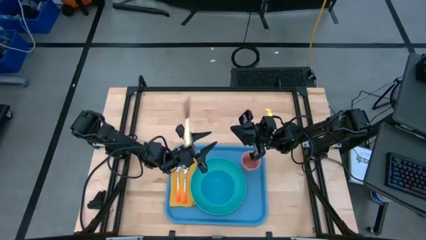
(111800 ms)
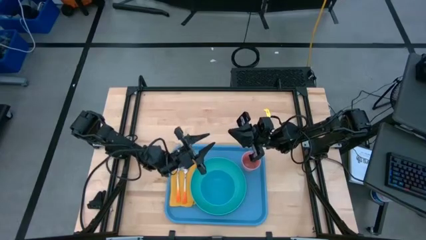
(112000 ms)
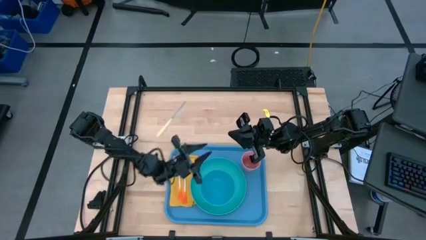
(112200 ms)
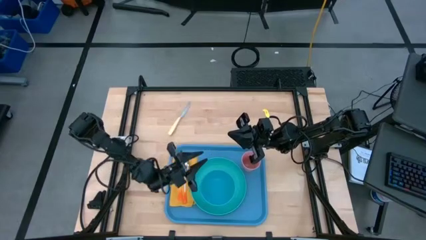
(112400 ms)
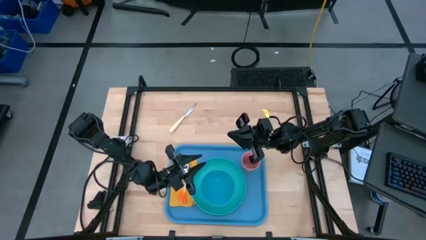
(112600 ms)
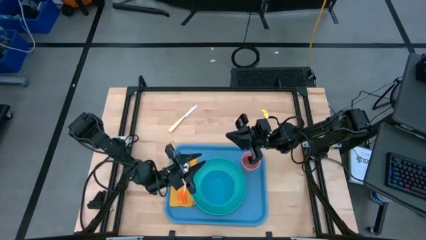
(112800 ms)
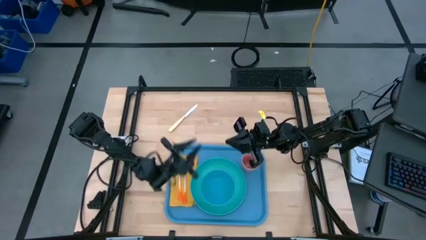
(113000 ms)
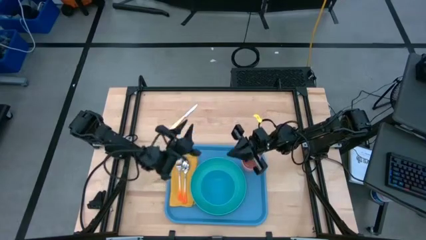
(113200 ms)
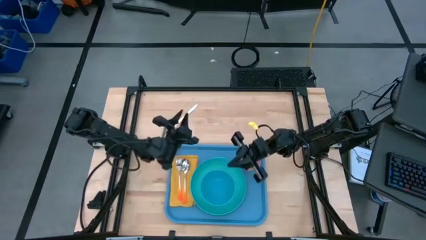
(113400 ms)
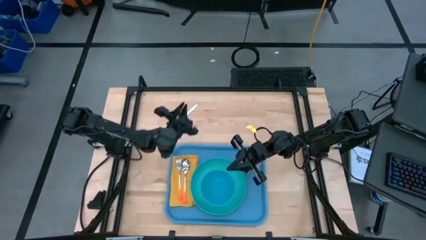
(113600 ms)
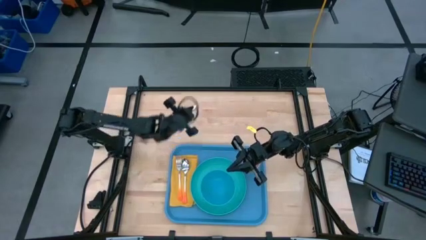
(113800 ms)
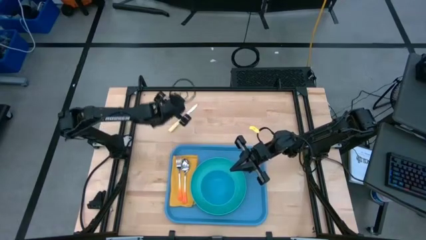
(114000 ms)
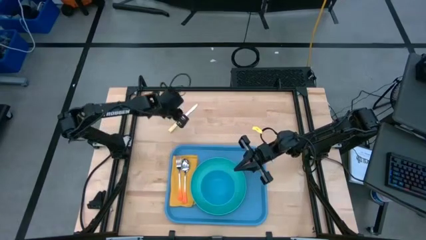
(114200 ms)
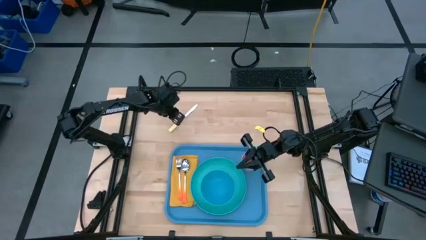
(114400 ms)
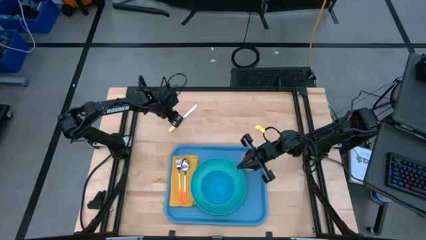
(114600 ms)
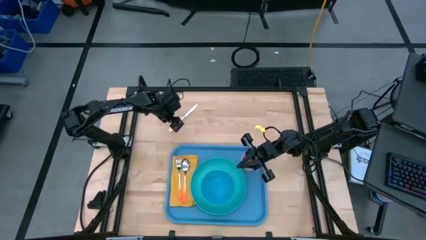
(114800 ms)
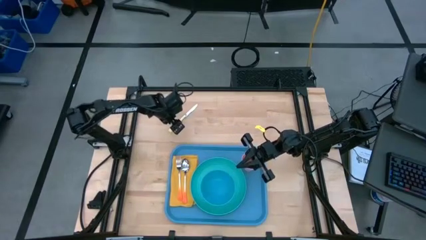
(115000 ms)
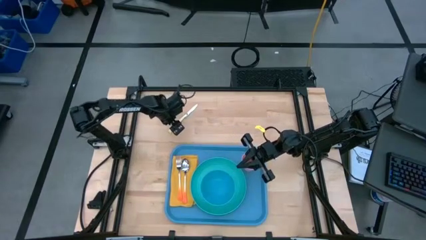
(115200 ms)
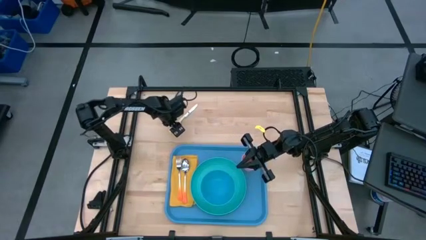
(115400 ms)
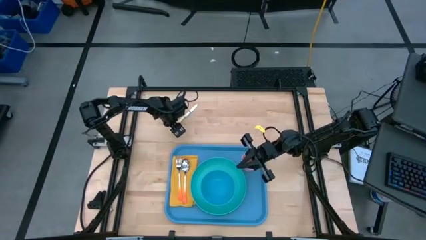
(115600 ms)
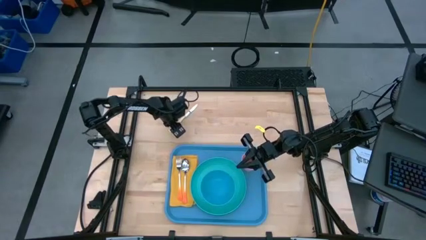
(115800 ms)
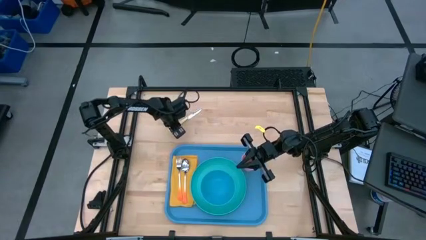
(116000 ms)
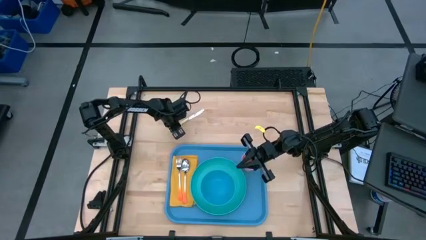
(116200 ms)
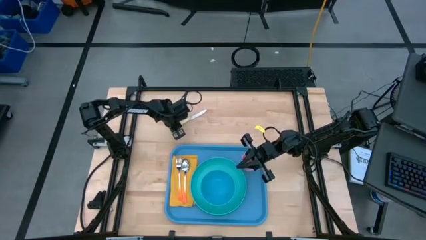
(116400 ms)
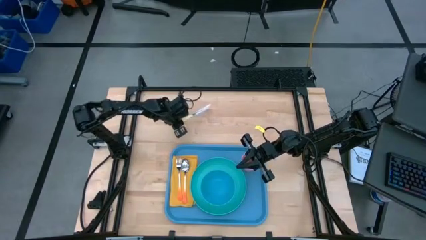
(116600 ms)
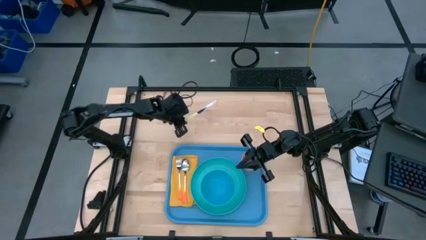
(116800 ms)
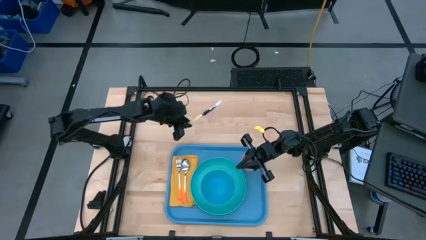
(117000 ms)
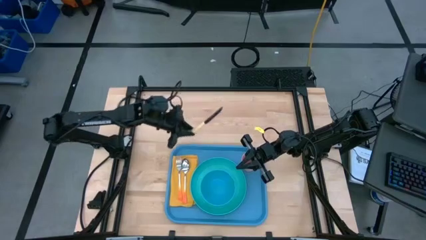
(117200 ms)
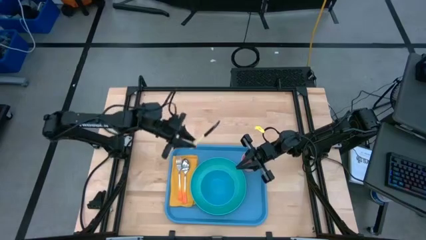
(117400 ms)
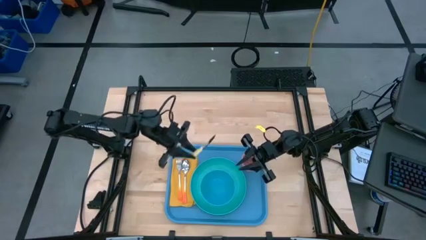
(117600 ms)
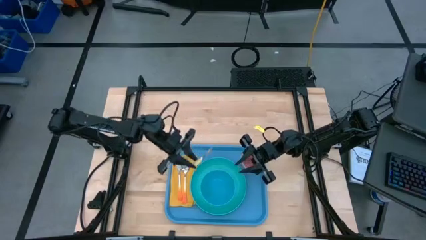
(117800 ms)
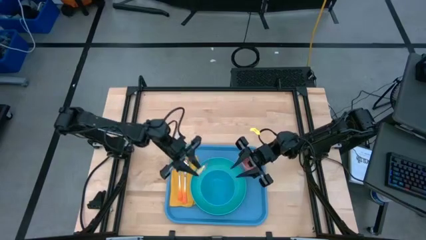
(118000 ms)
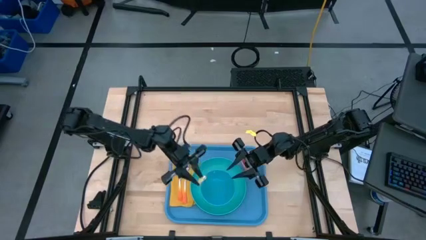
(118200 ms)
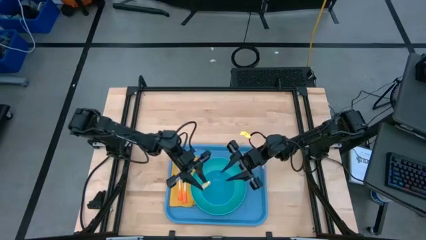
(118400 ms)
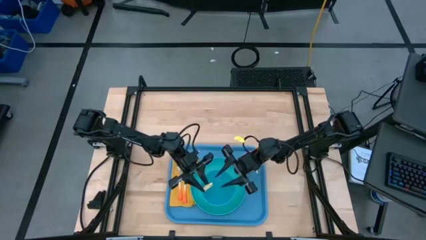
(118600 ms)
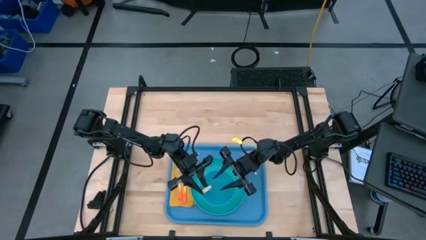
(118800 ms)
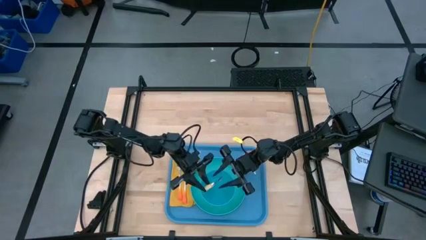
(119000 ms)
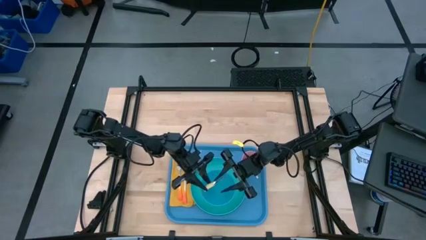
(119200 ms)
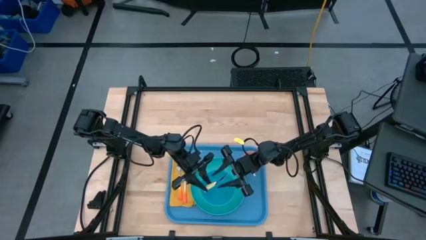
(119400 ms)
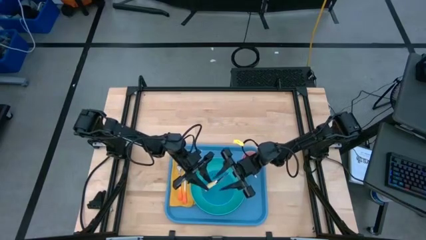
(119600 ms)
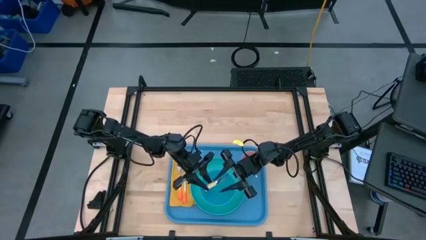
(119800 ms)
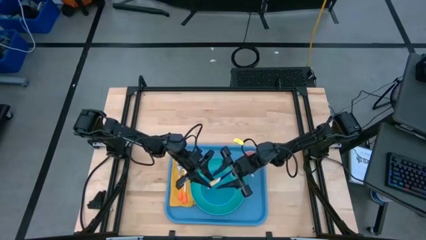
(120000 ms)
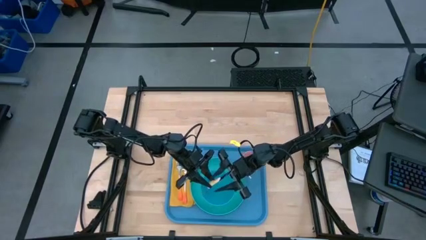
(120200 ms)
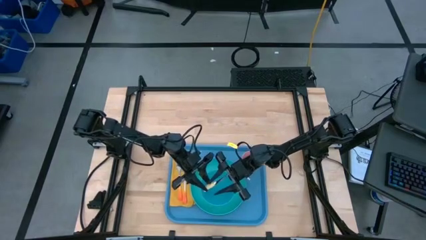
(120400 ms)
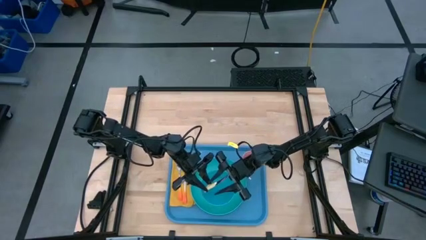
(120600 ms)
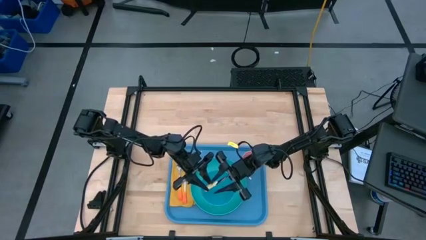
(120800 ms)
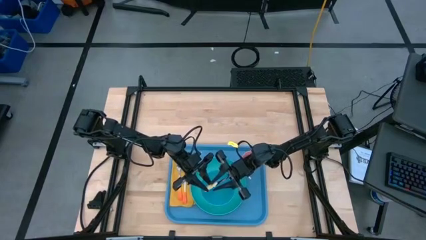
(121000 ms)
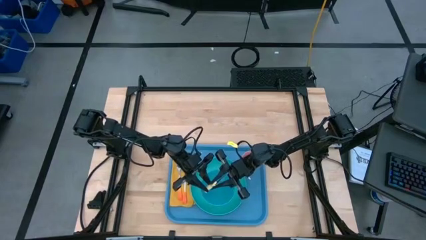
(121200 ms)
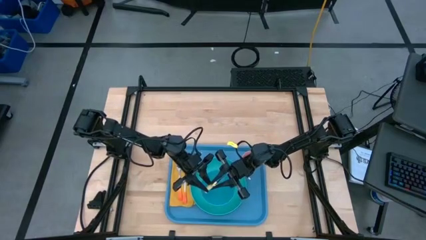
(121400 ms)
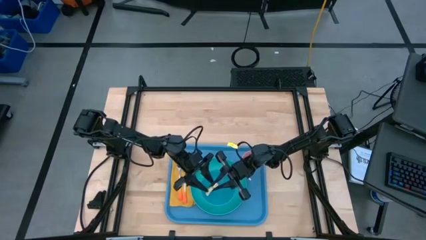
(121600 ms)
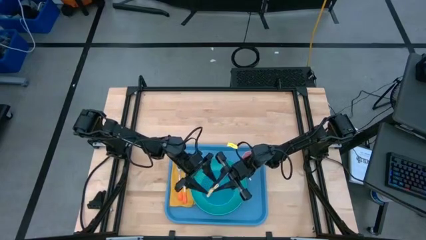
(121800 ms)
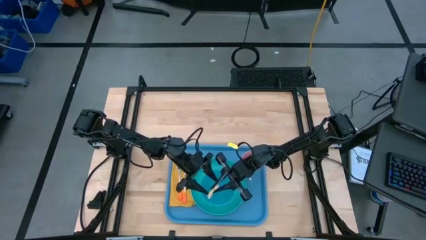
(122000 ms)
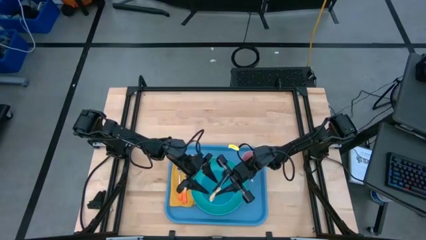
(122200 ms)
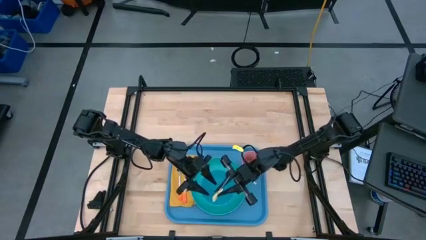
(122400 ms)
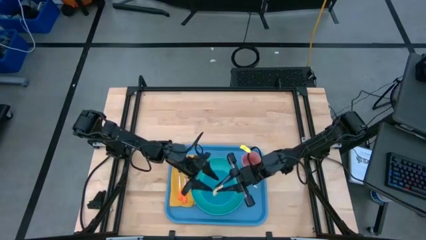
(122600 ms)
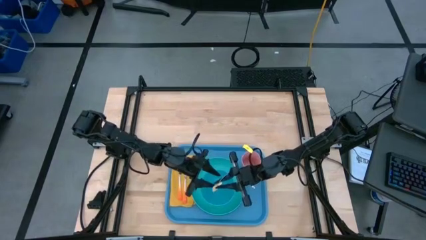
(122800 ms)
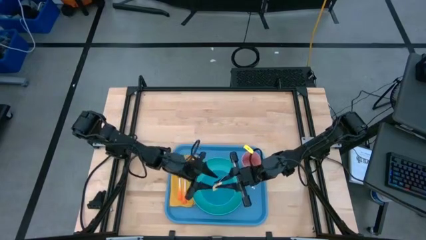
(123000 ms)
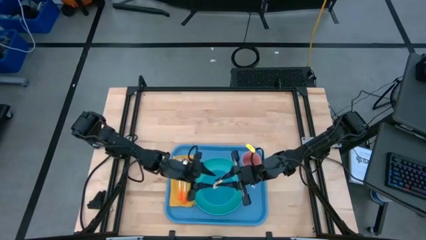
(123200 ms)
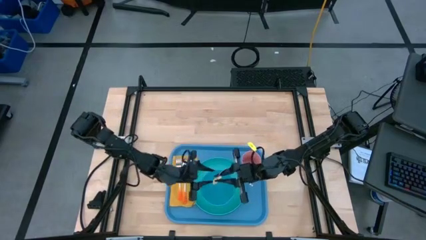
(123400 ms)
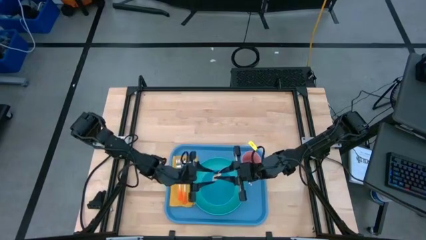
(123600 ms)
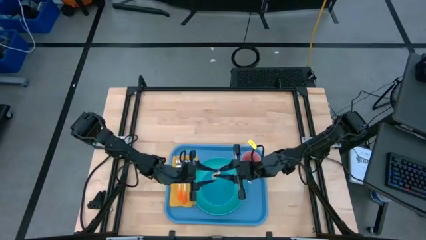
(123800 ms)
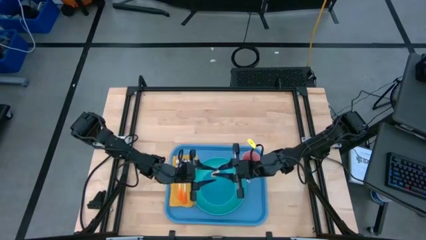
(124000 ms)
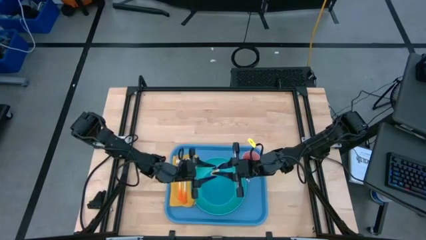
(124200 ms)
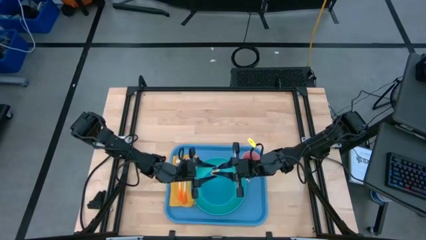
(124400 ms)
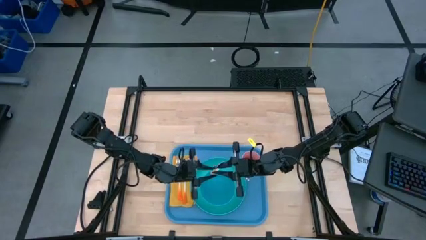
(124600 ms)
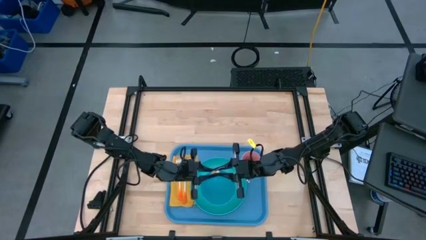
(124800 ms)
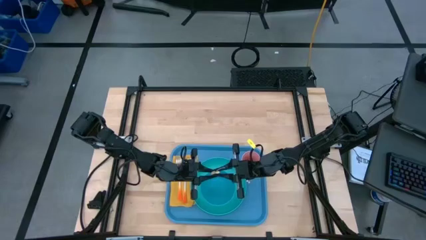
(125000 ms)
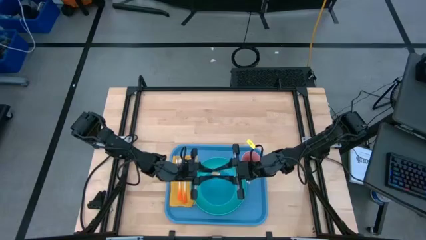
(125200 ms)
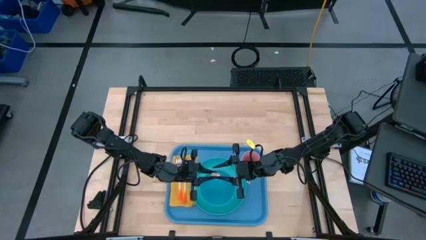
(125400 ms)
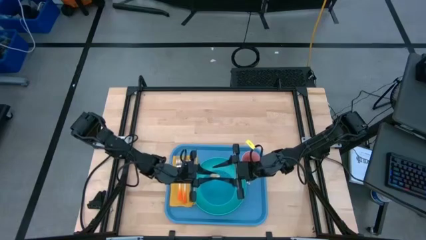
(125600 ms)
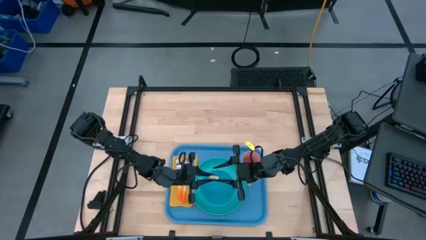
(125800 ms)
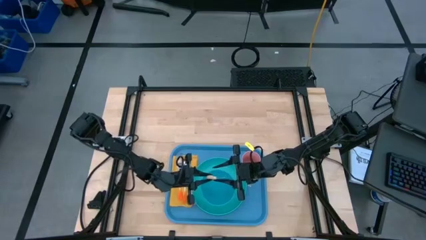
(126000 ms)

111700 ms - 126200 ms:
Task: Set up tray
Put the yellow knife on top of the yellow napkin to the right of the orange spoon

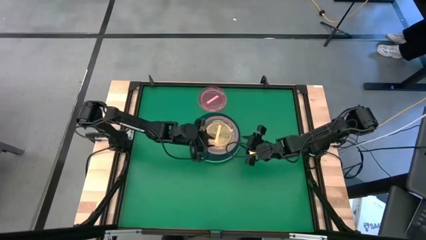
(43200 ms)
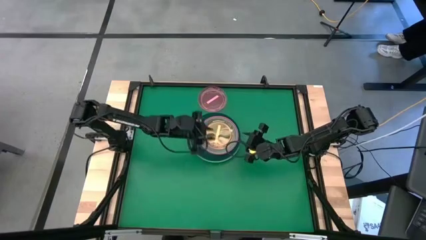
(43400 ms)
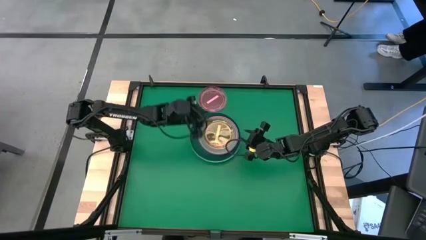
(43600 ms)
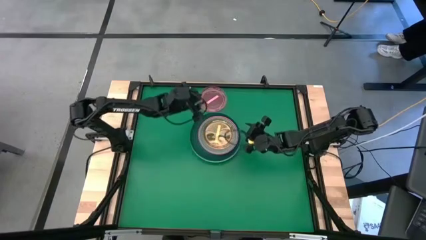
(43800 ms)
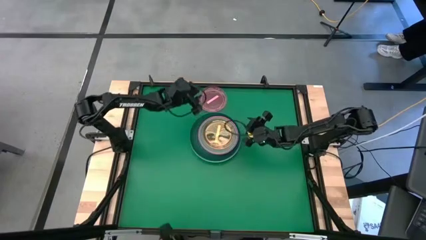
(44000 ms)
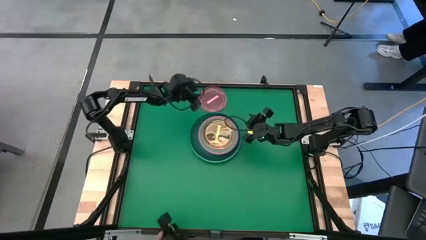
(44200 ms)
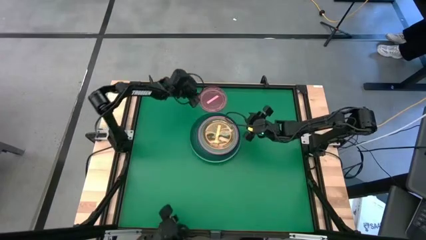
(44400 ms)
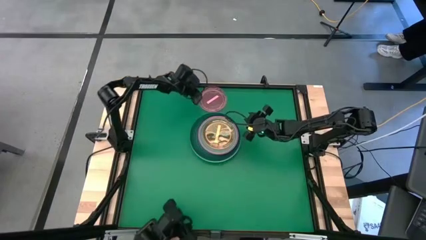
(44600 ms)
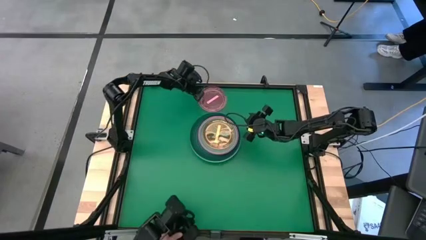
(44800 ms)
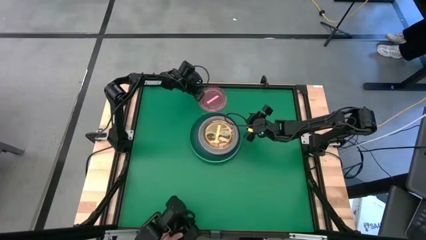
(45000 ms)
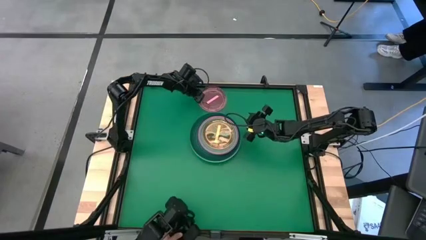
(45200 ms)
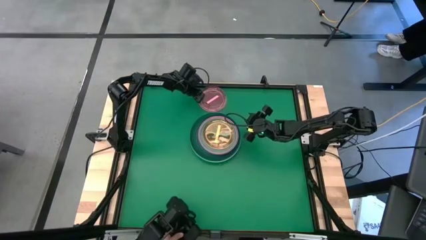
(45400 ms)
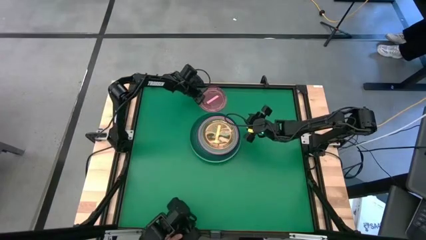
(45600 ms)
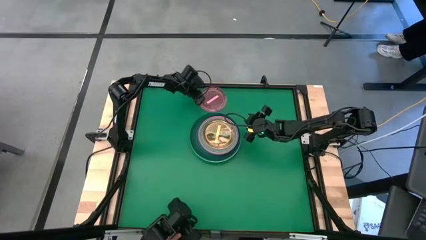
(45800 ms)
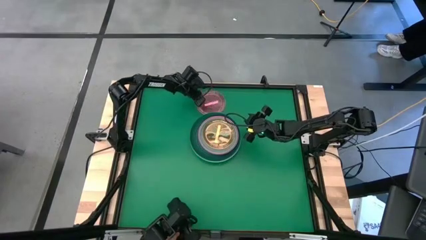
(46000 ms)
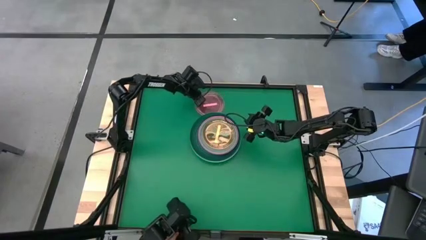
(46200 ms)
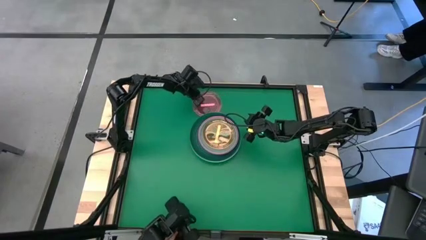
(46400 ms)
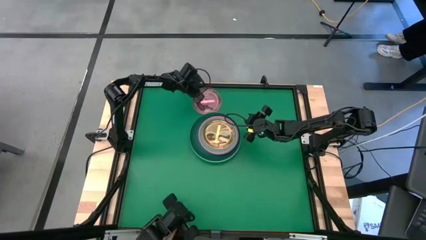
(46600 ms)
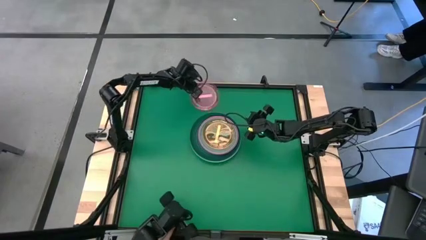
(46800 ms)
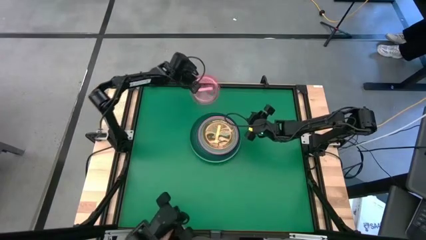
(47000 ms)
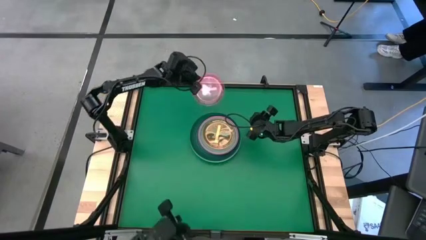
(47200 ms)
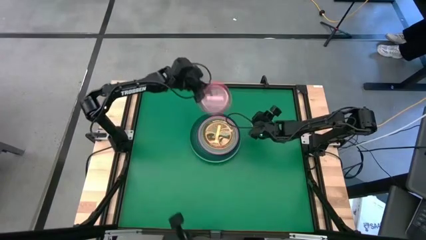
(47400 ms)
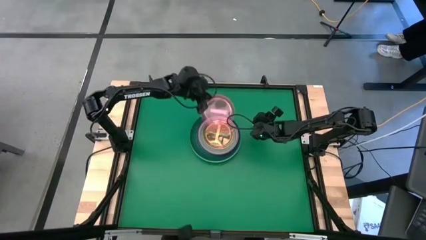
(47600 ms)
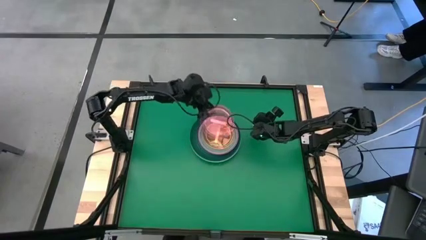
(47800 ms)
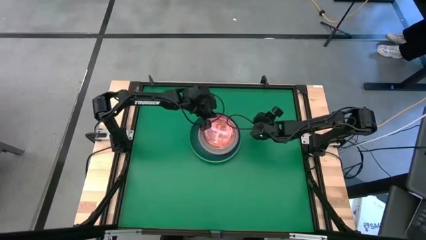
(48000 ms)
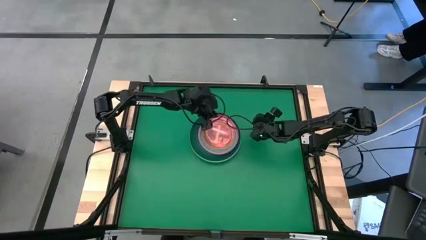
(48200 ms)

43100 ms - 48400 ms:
Task: Stack plastic plates
Stack the red transparent plate on the yellow transparent plate
